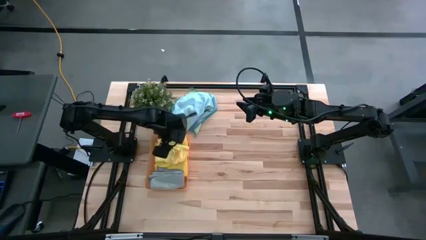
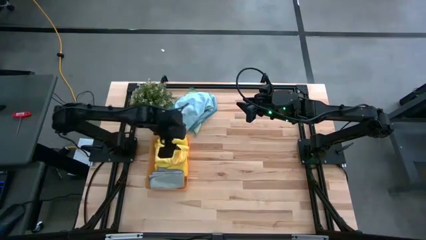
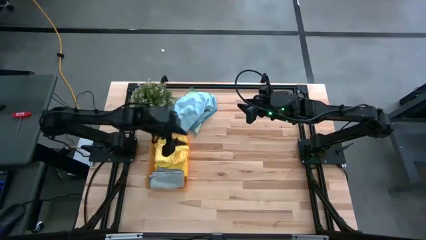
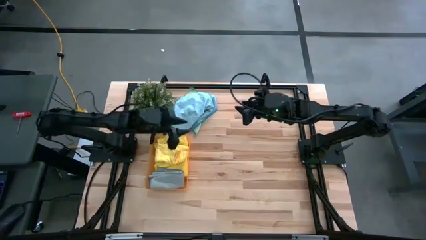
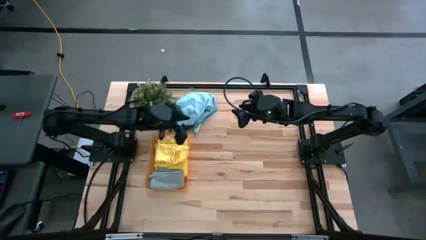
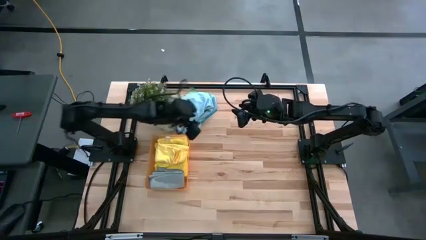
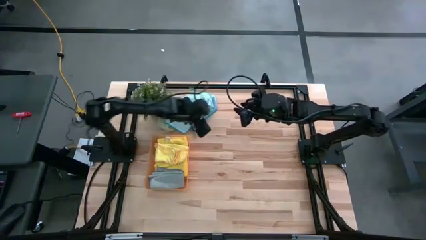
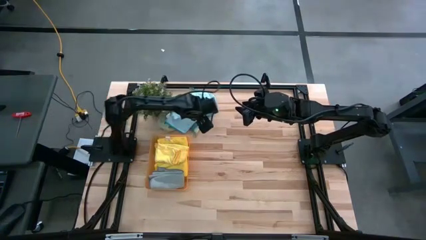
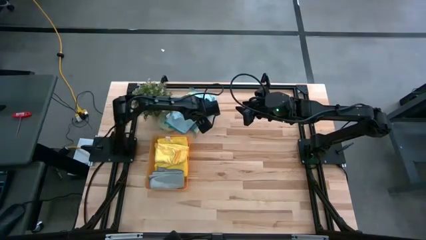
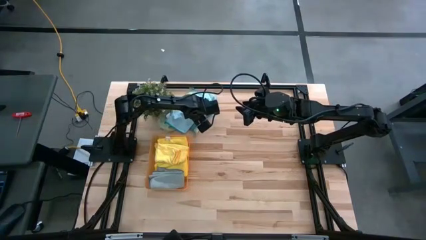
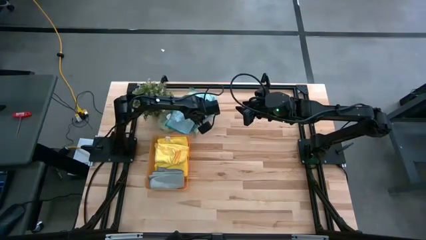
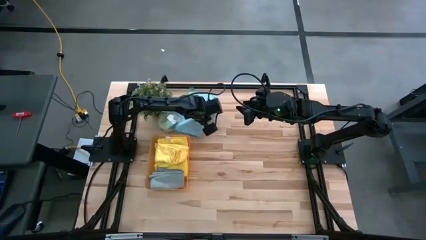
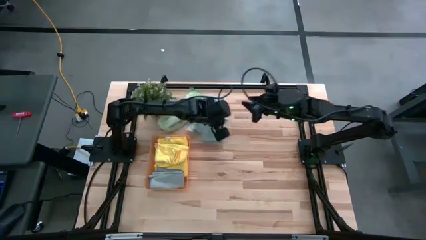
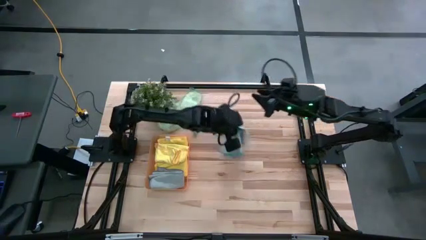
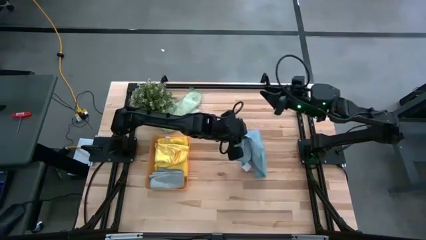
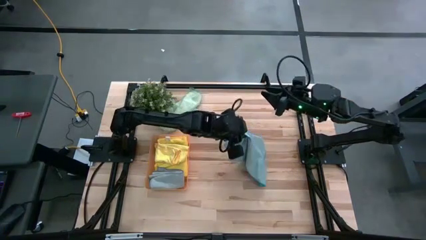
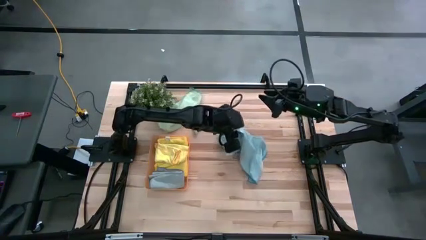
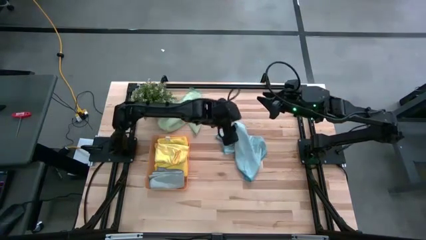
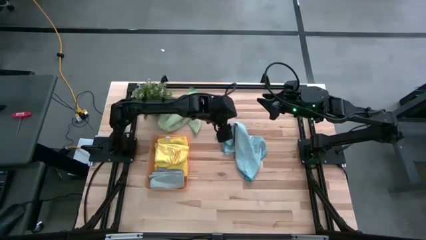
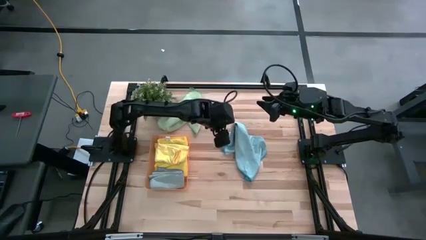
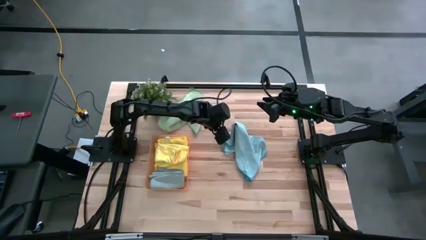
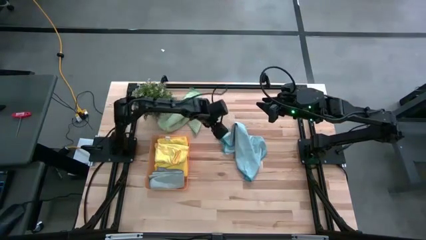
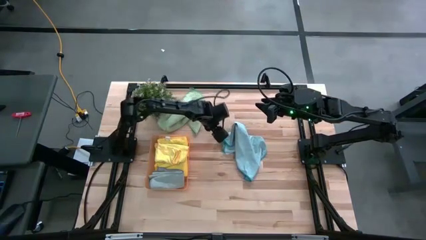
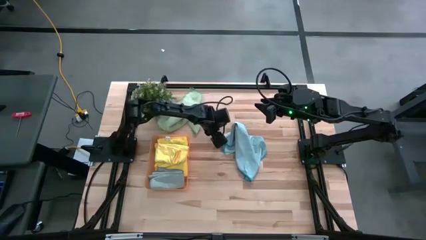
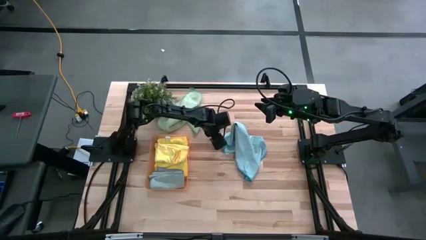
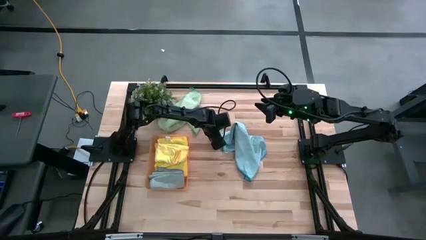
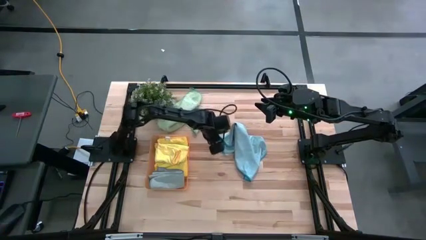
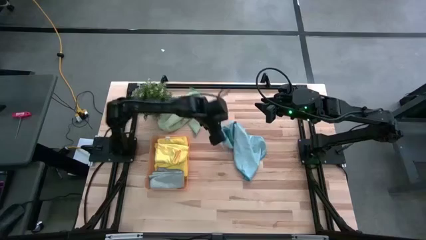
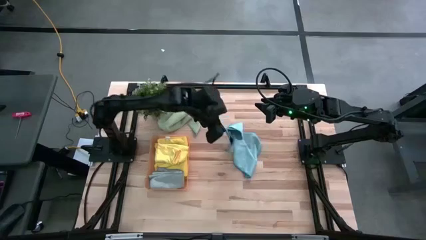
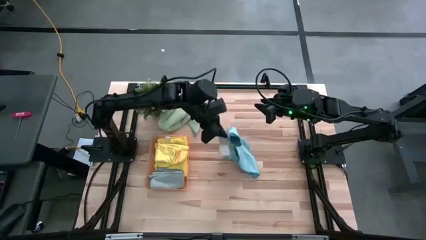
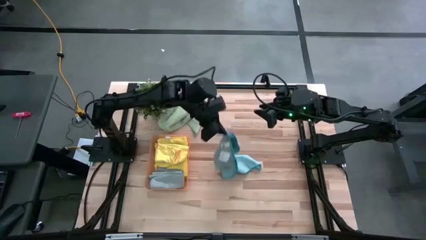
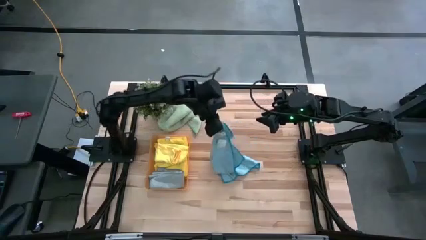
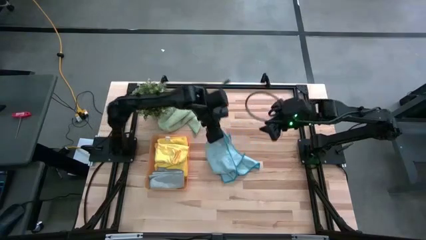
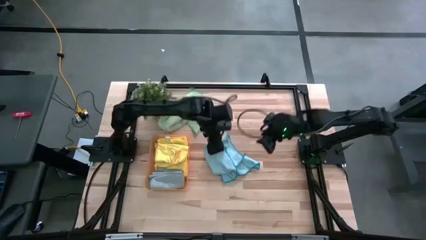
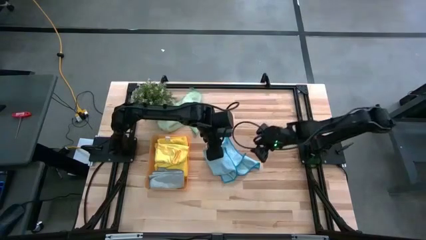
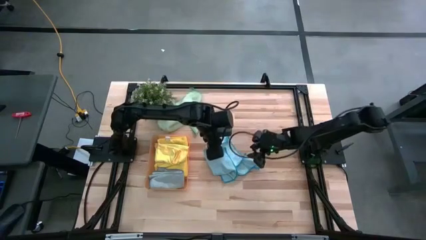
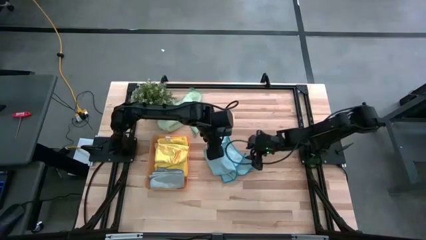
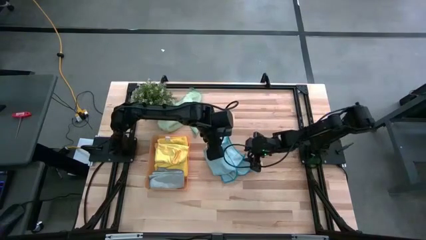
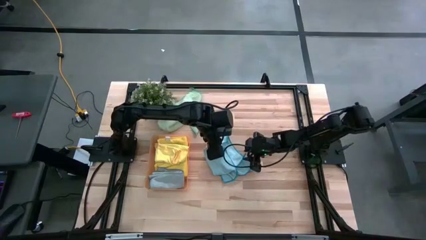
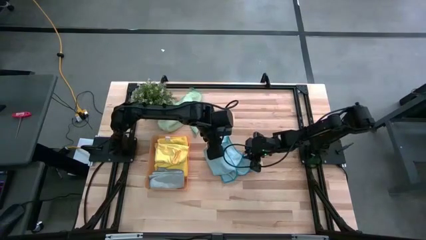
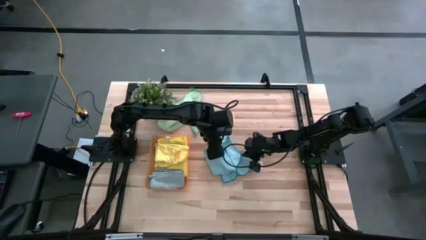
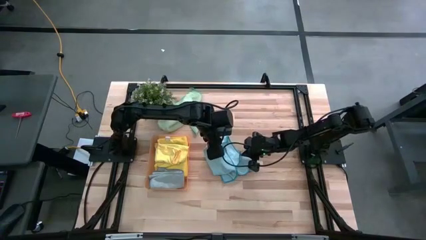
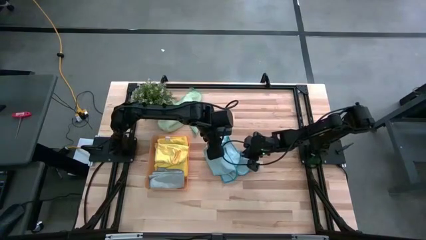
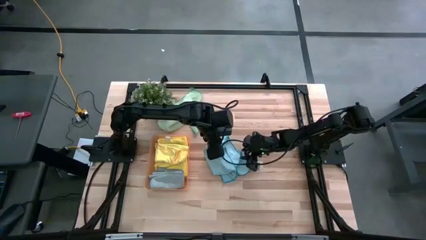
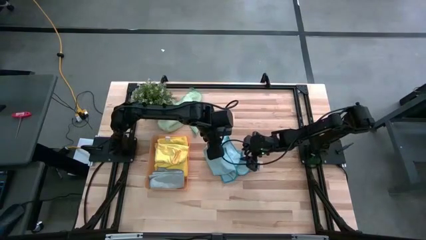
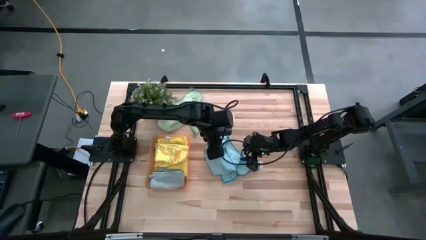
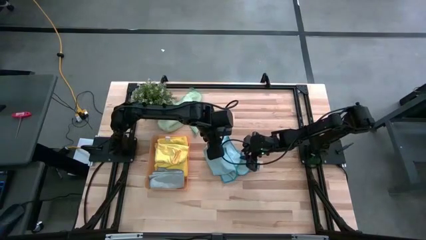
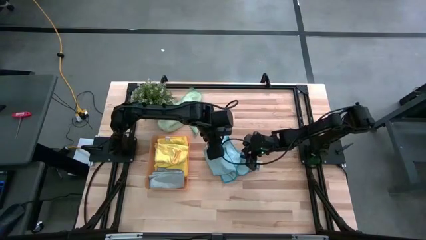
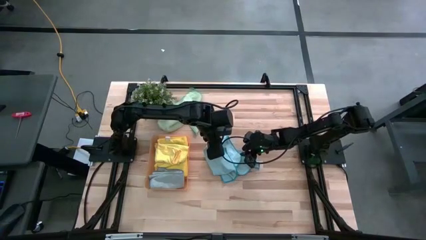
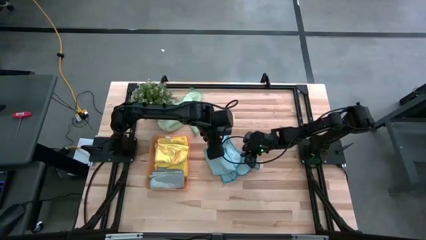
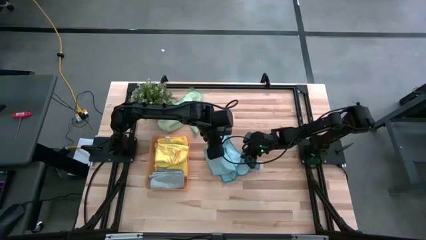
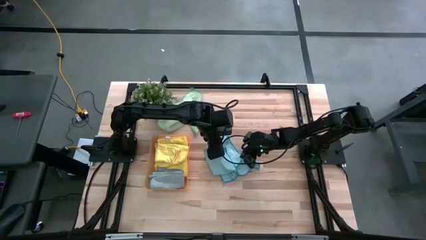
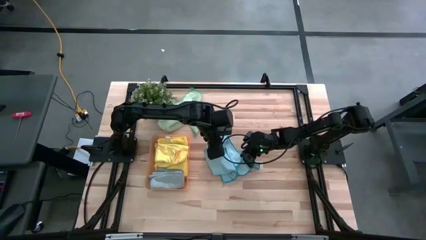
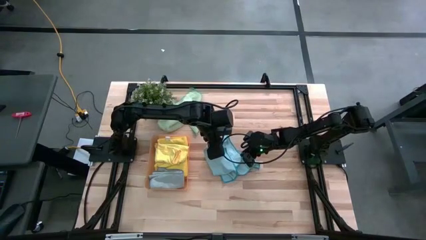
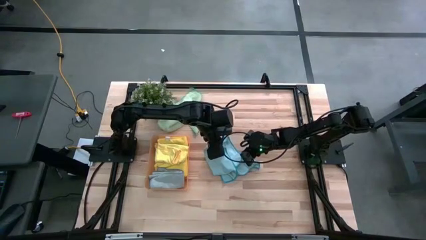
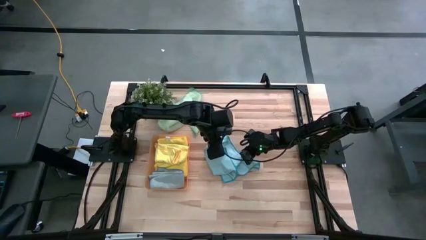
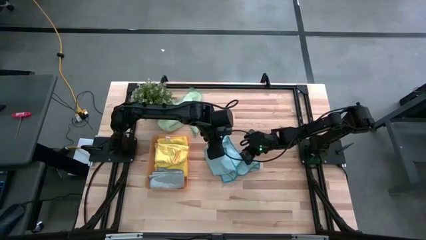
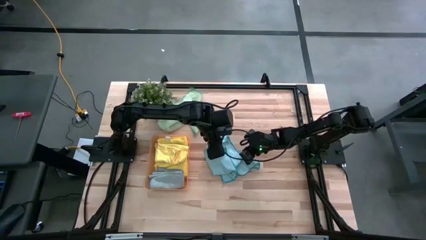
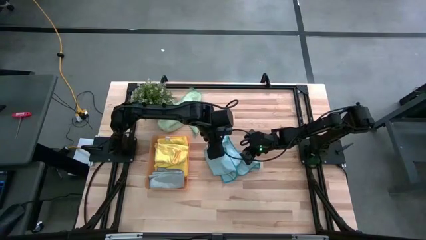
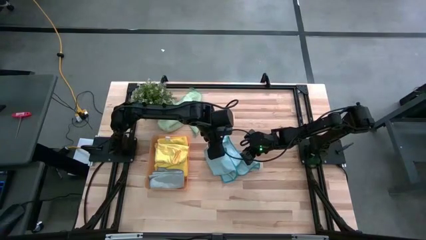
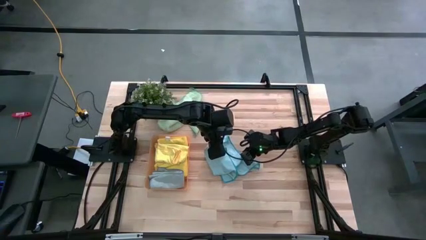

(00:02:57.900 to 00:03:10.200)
Task: Fold microfiber towels
Fold the blue microfiber towel
